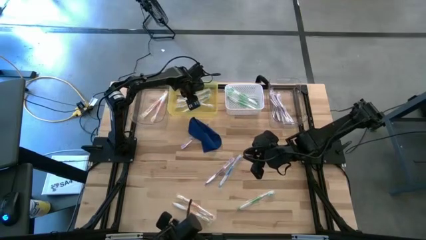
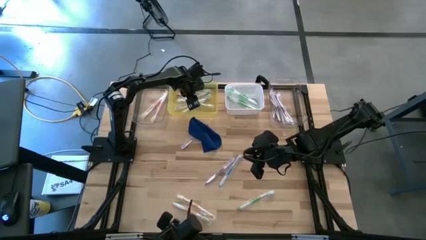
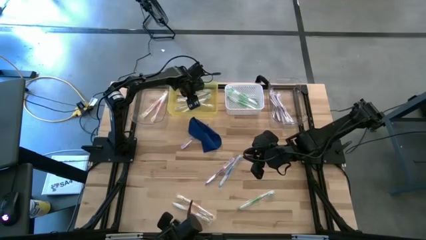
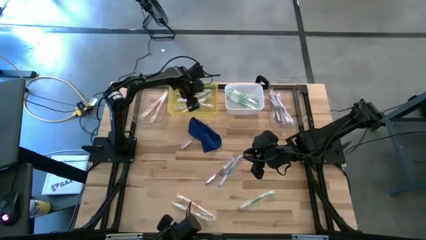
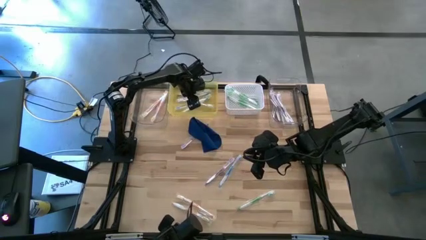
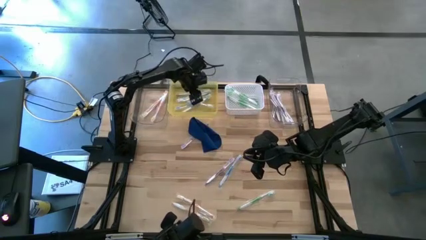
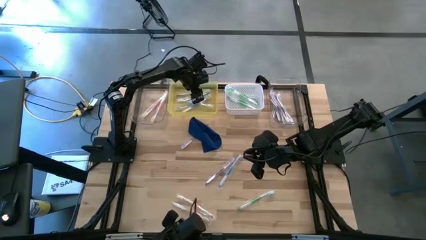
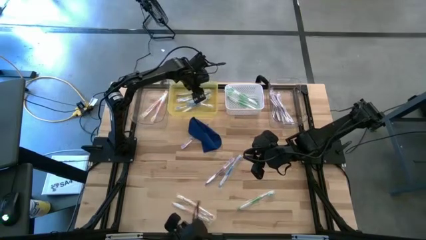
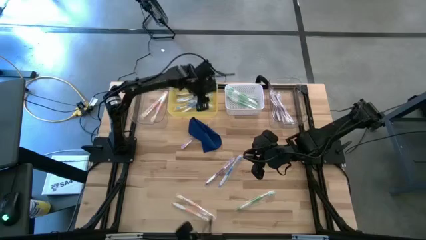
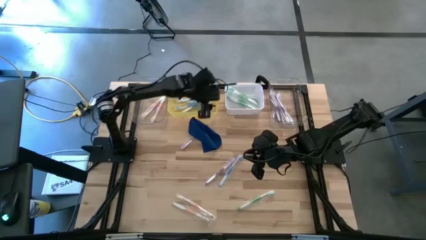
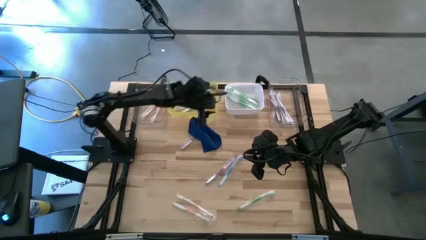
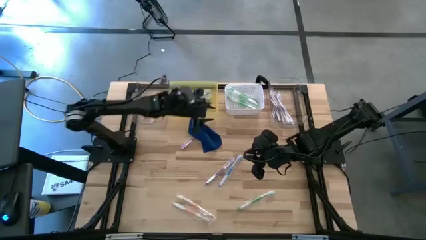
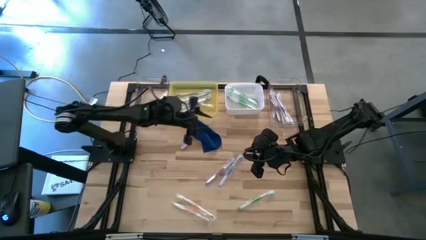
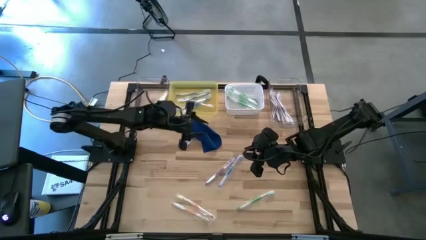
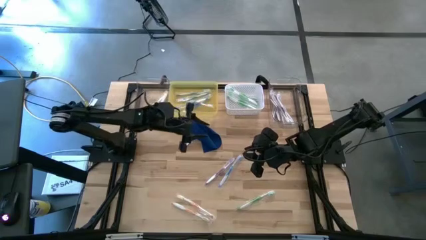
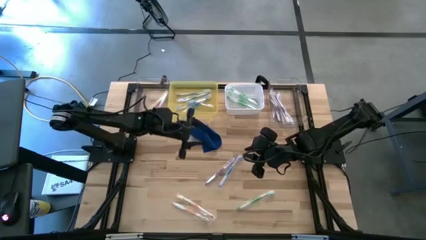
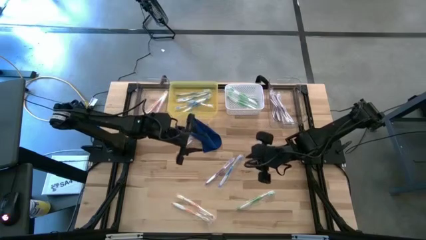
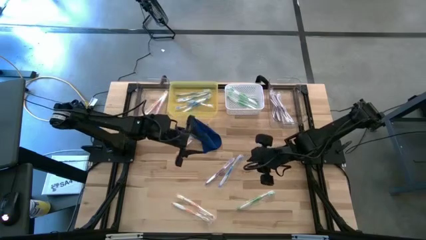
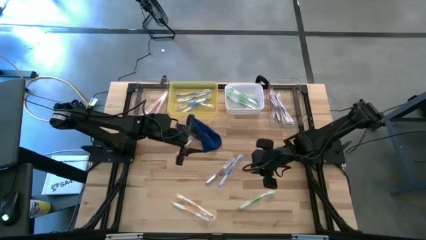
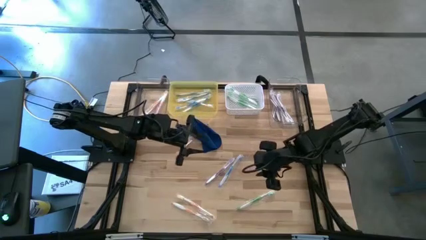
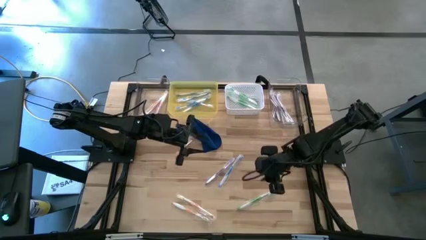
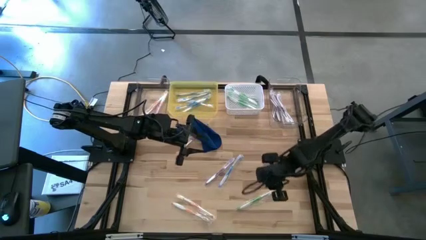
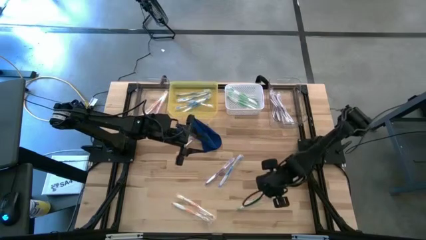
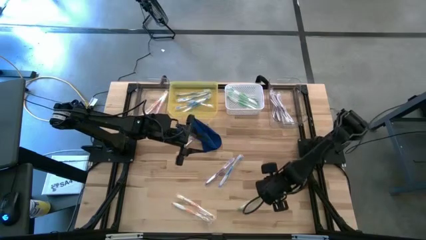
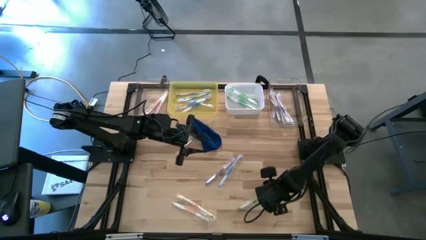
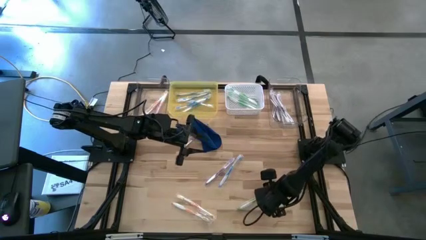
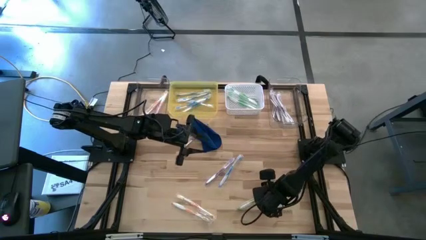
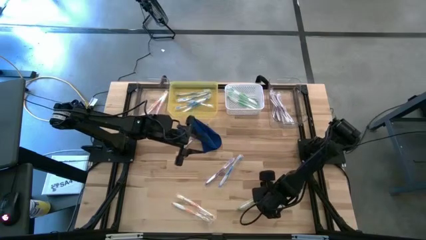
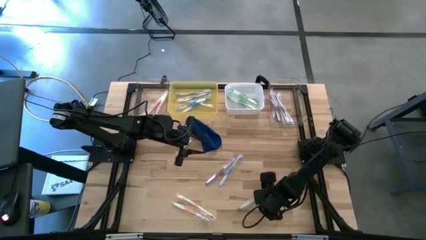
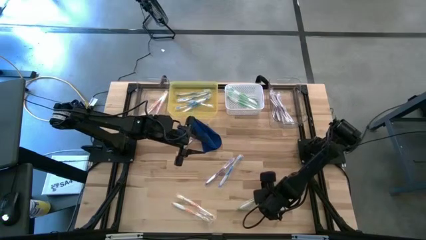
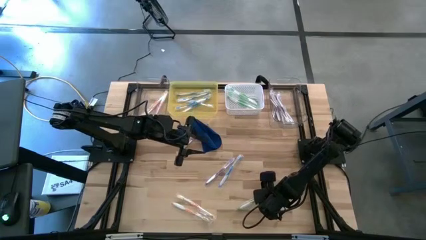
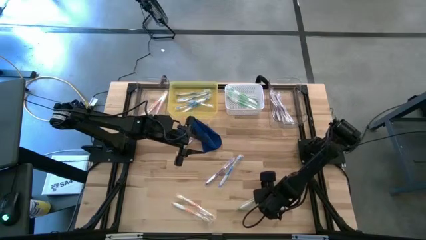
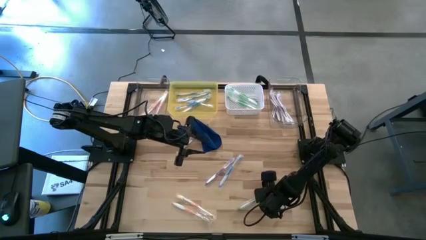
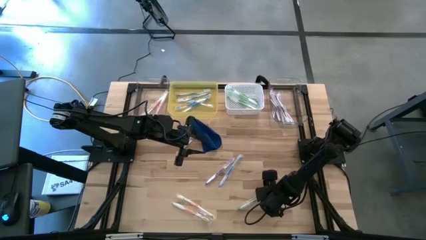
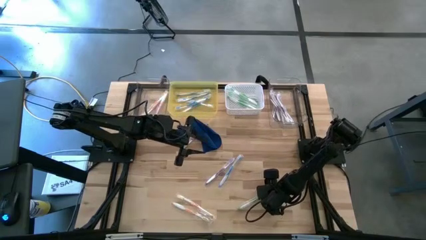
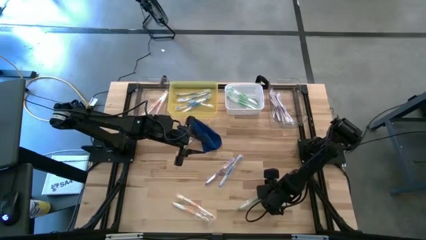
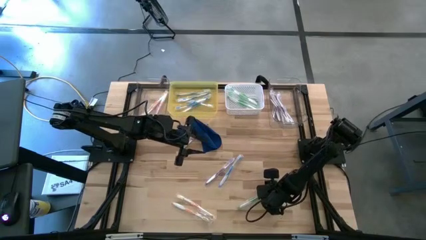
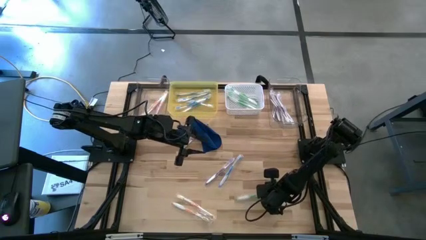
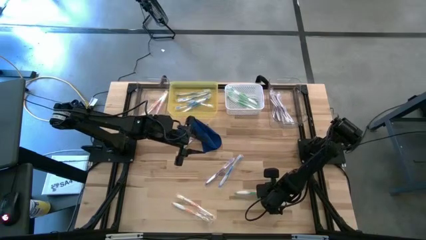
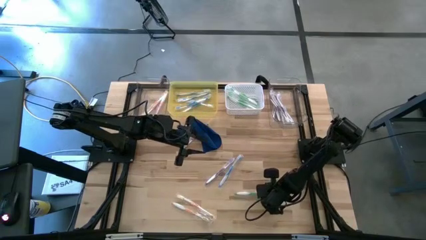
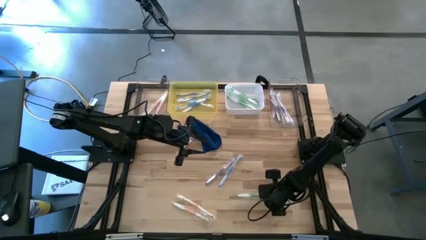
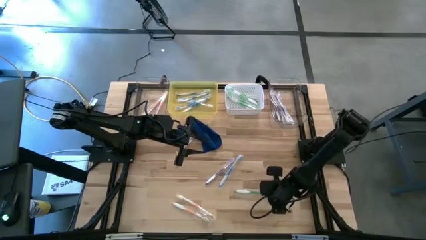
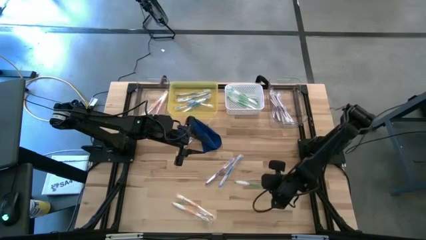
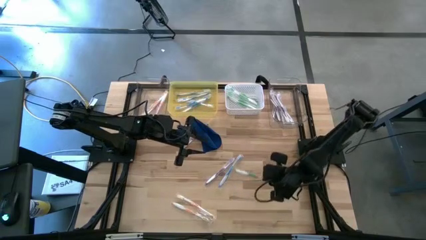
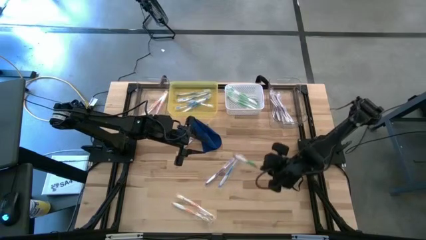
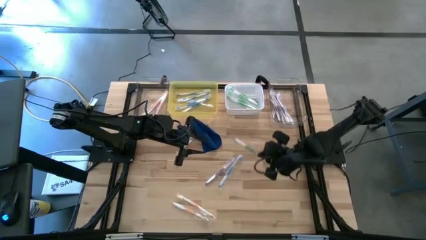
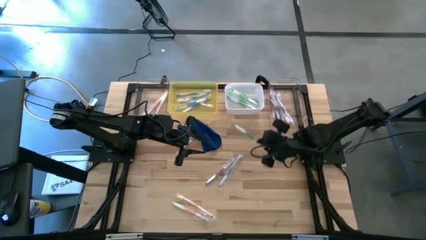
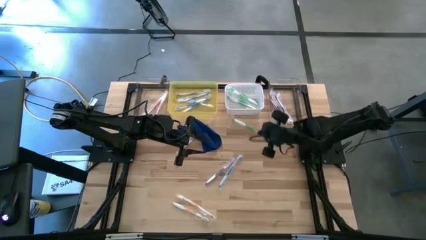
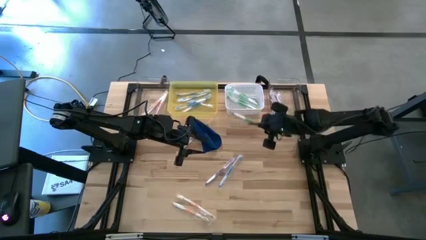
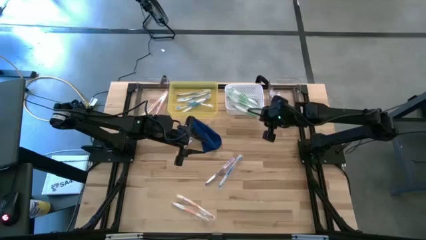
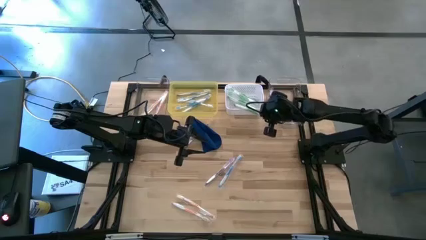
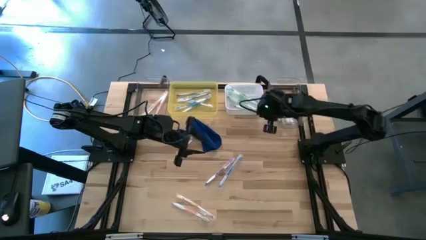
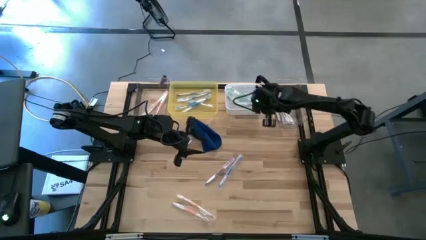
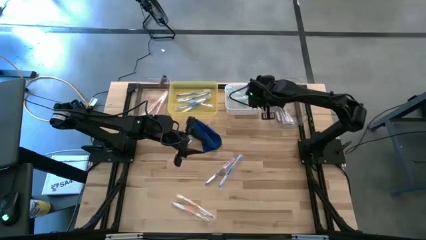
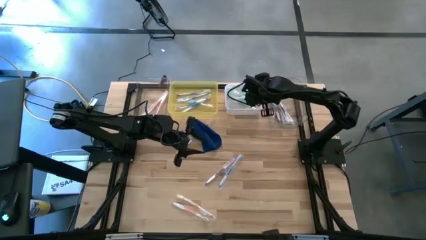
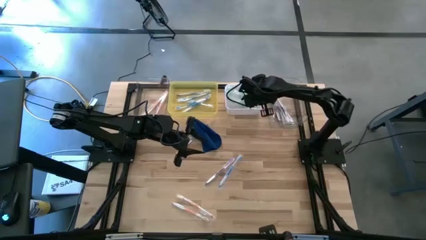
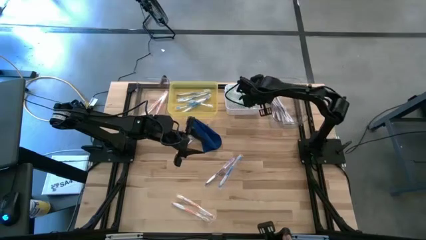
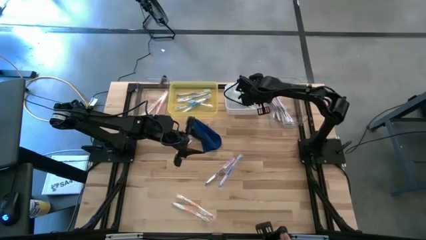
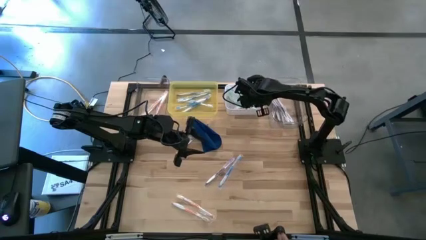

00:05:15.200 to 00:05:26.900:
Task: Pick & Place Toothbrushes
Put the green toothbrush into the white bin

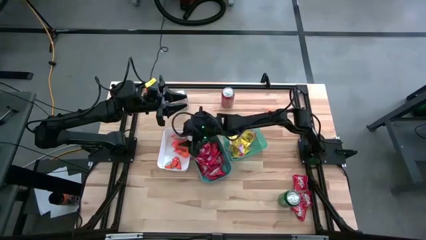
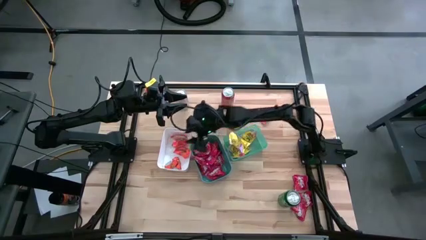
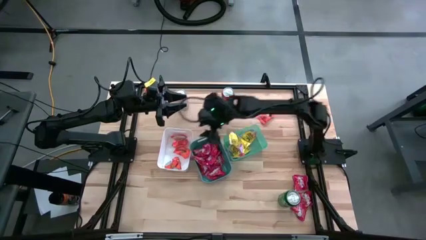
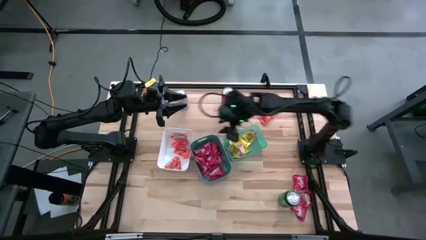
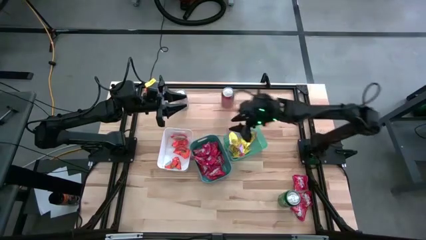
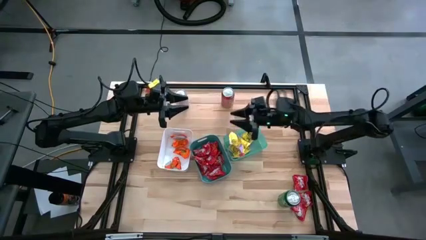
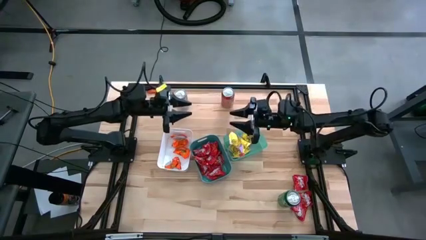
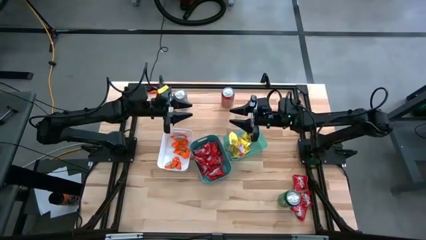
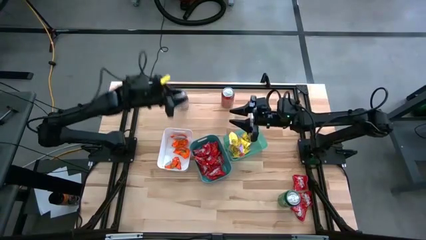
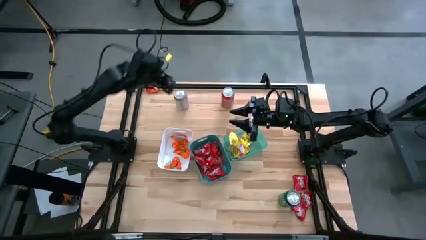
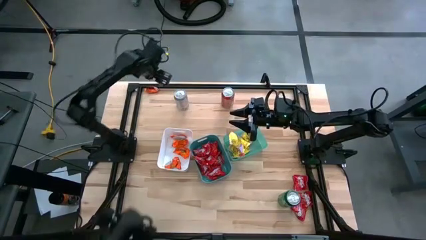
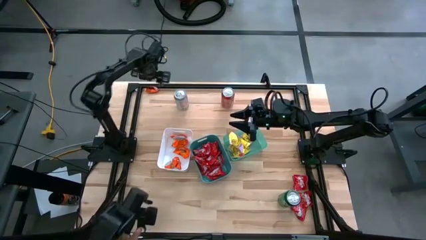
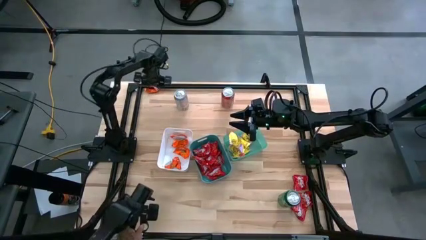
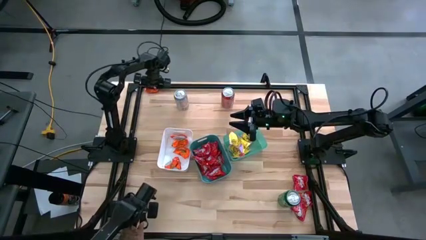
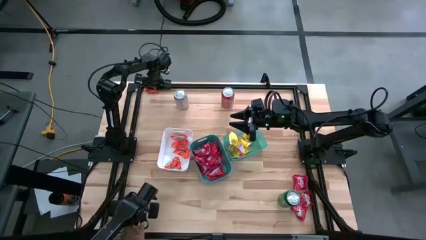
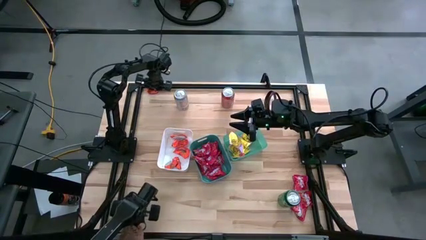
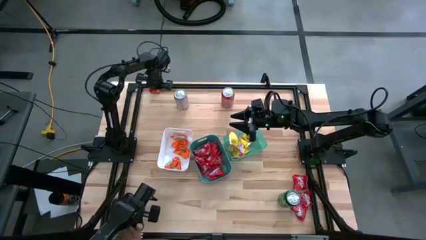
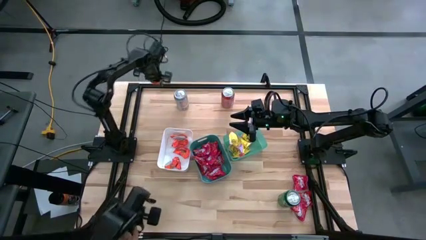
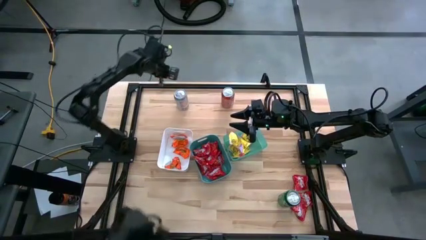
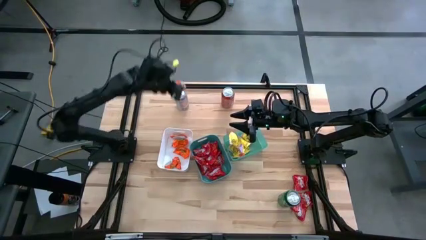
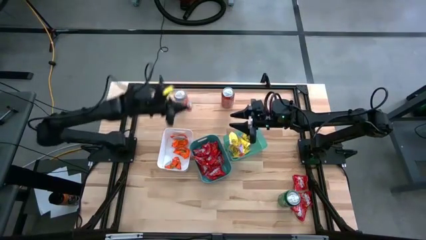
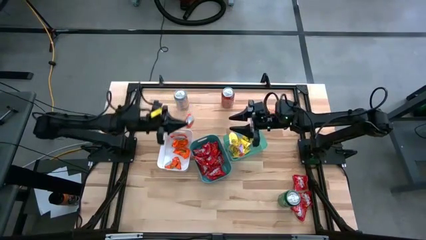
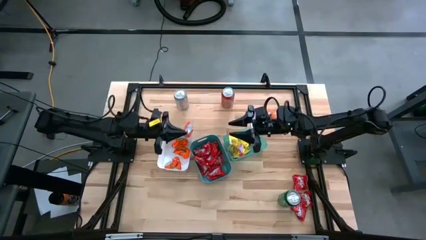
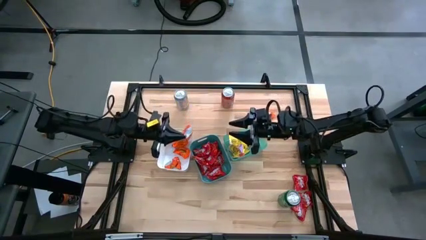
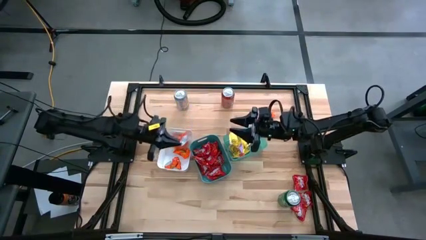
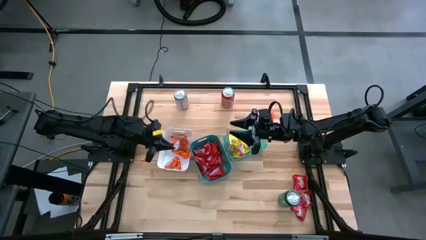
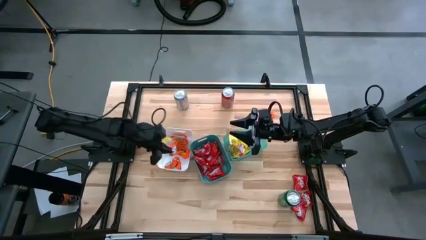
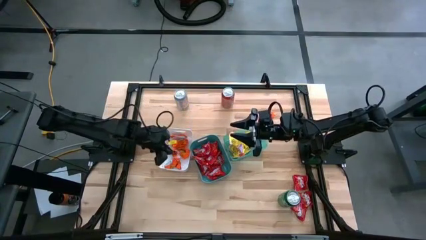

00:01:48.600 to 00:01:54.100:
Task: Sort candy
Put the orange chocolate into the white bin
